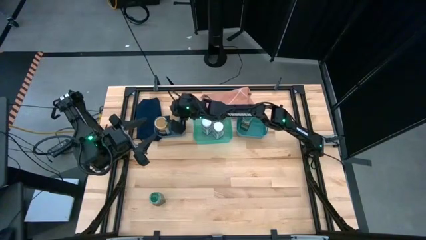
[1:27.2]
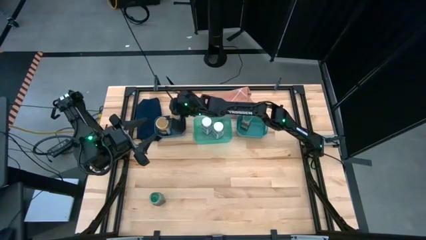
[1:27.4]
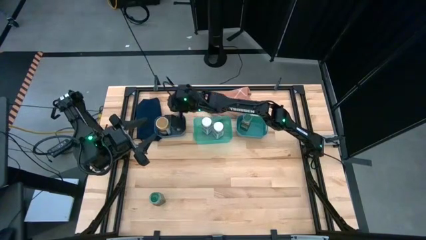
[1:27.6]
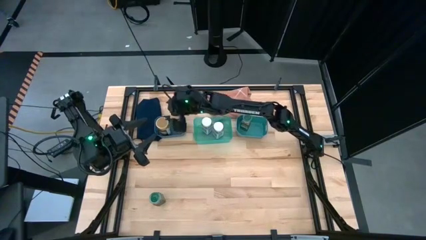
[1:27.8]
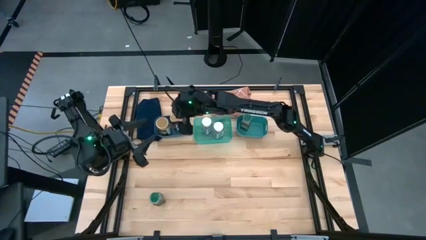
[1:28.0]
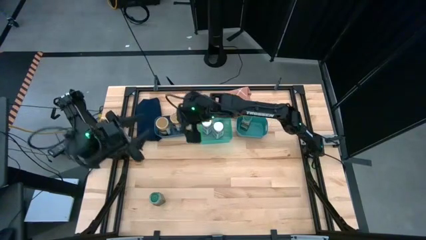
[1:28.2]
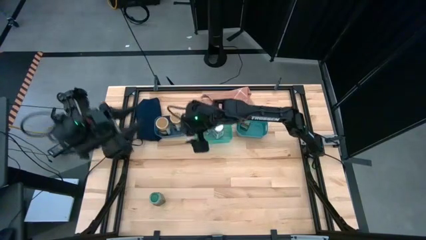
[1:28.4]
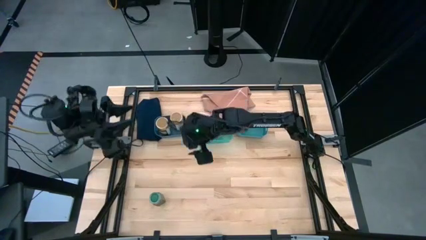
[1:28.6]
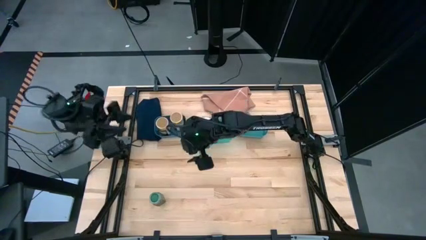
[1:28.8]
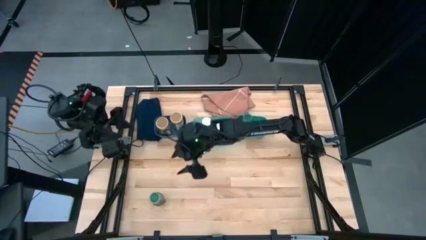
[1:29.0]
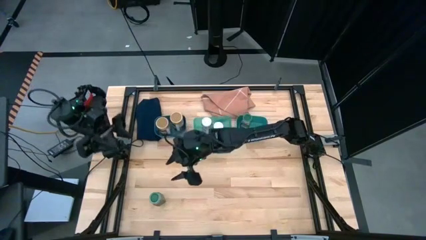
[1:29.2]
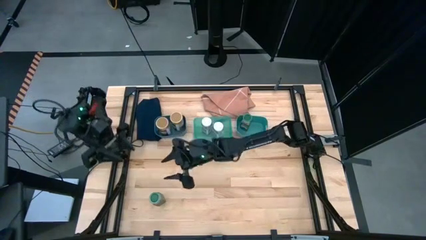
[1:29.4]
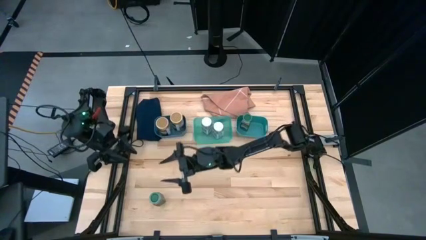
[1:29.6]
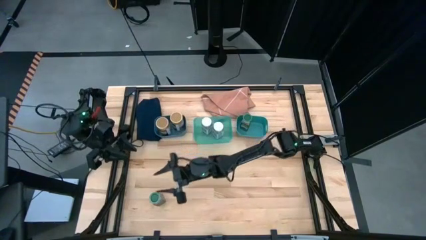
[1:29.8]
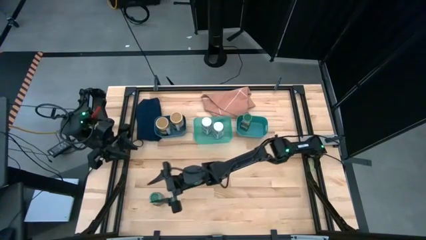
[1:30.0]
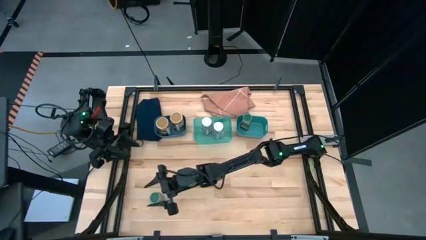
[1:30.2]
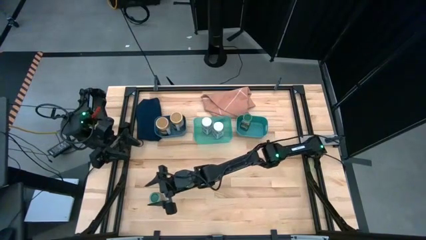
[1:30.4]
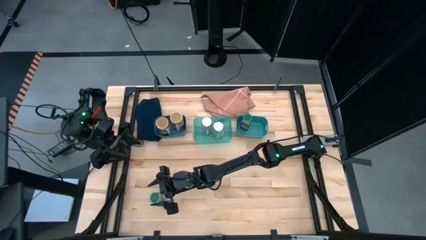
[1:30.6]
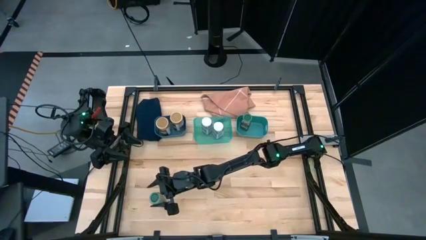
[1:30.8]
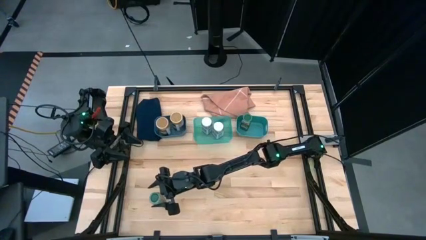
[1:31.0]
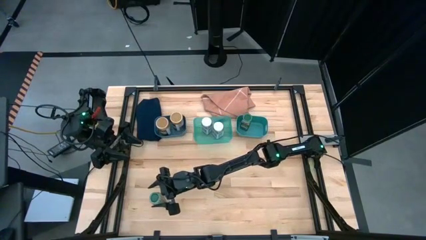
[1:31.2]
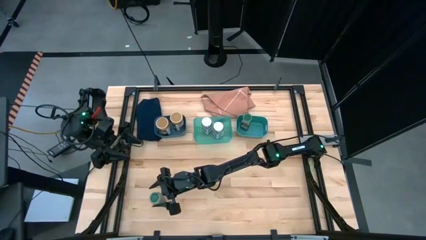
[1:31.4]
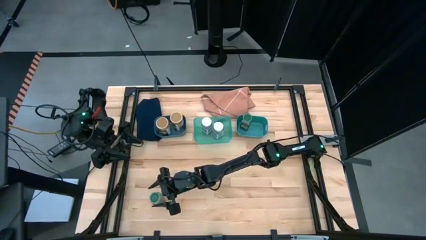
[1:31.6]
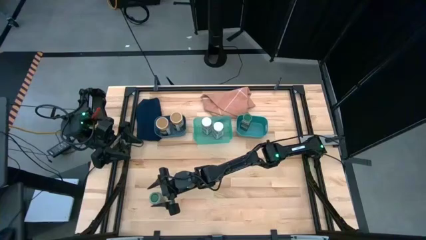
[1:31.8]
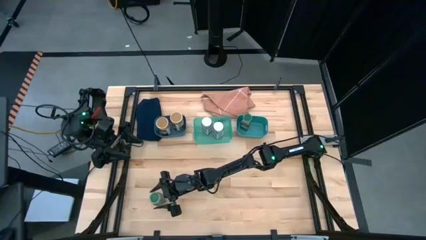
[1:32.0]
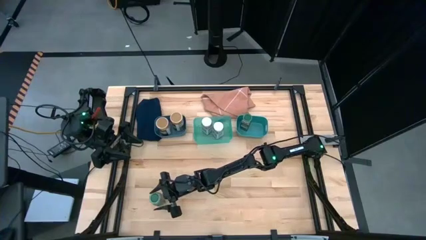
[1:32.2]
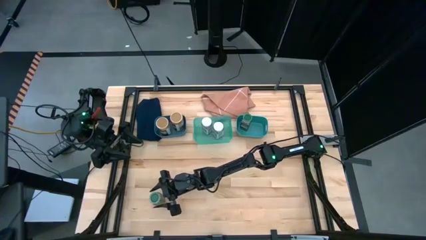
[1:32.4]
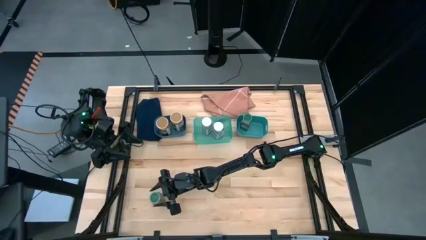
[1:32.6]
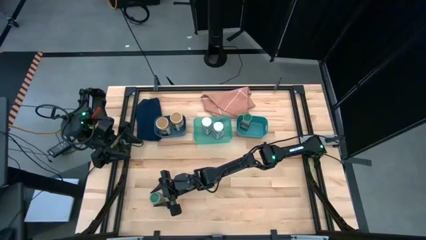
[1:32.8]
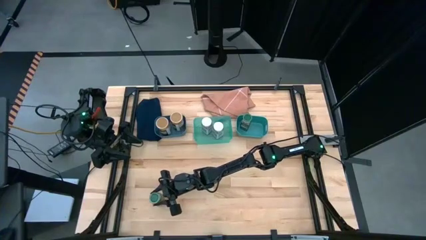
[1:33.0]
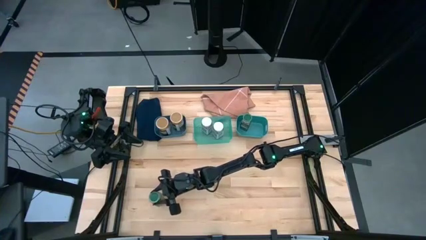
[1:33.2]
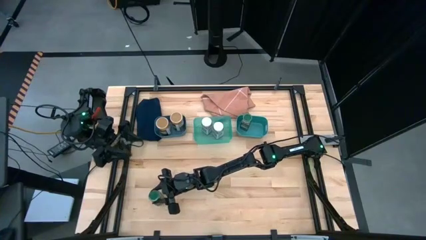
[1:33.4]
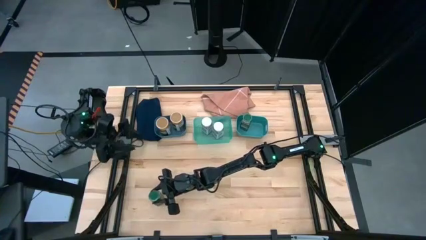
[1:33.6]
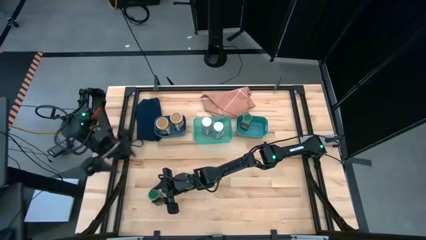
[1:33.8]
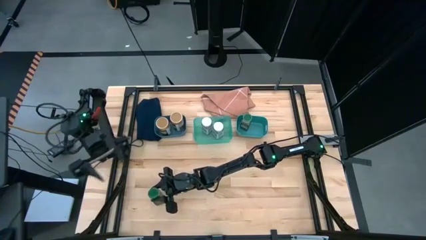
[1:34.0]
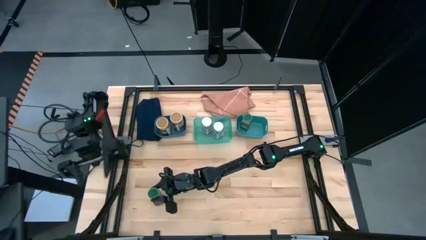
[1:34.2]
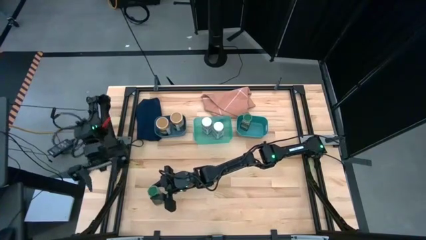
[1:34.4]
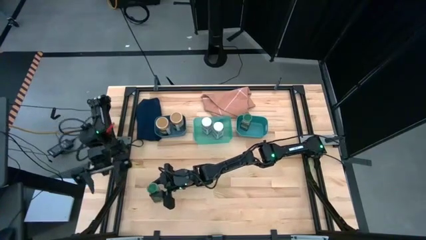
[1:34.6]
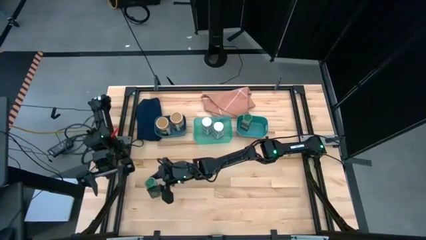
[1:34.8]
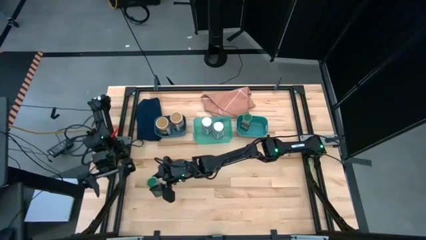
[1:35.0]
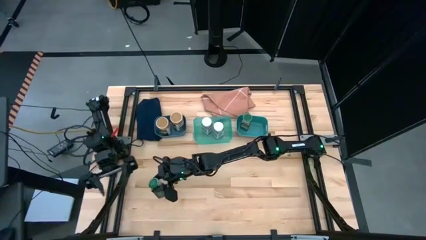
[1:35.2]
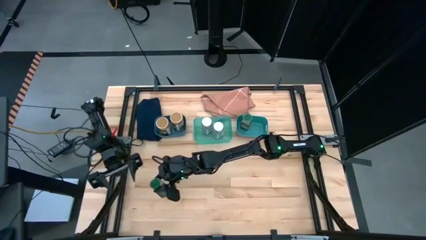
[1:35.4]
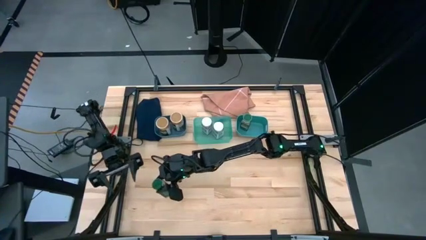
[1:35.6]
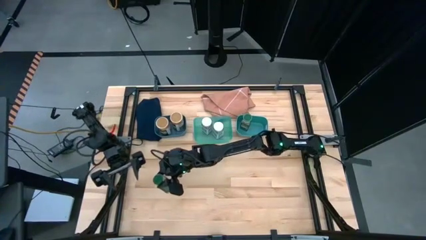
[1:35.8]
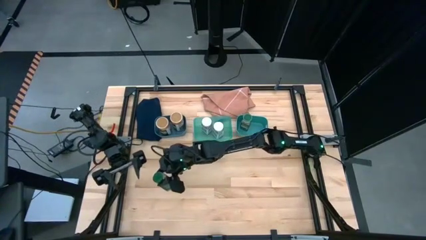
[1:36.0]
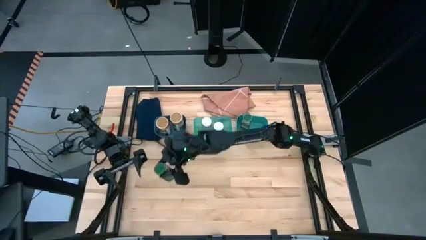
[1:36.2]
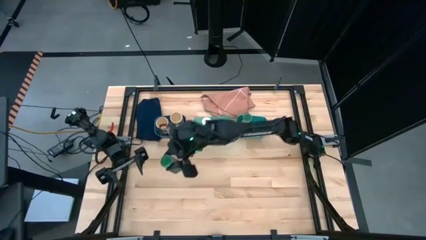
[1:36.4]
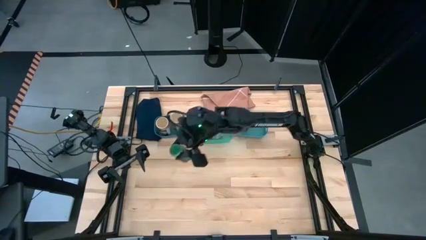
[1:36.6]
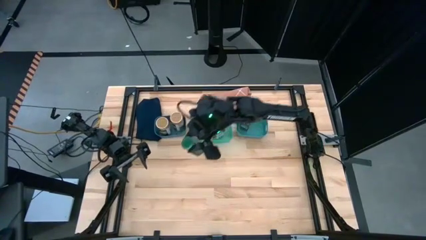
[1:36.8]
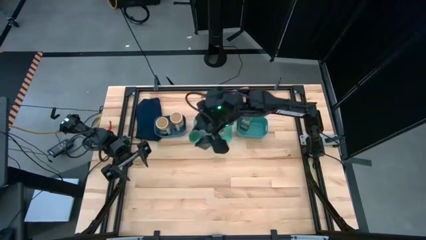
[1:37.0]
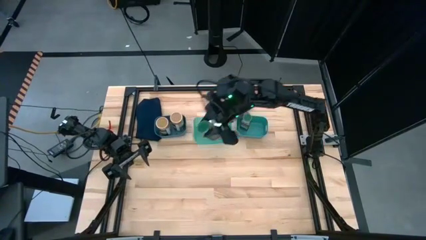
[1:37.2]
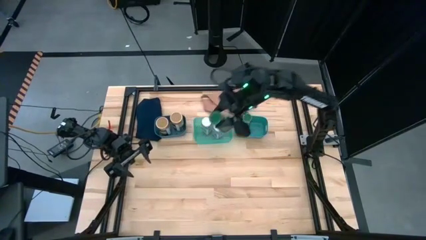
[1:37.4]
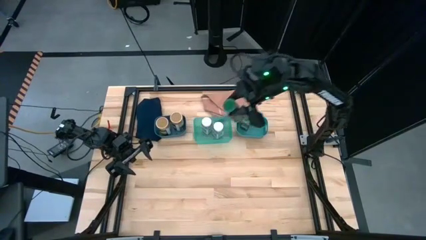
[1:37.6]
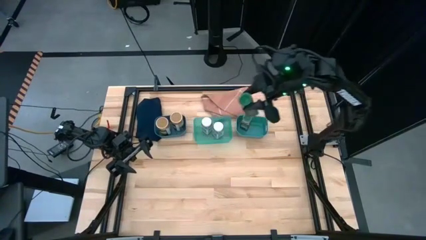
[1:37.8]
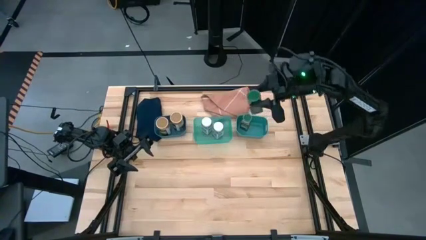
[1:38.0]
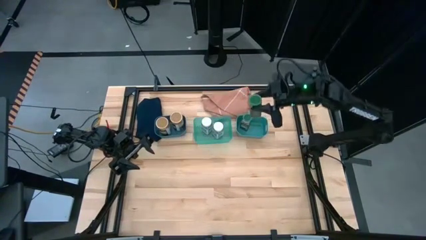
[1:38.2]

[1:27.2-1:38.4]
Task: Sort spices by type
Put the green seasoning into the light green bin
